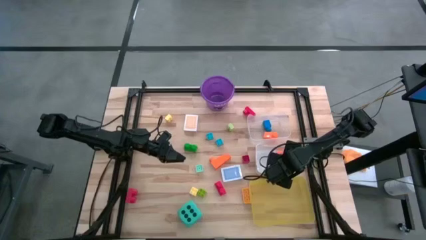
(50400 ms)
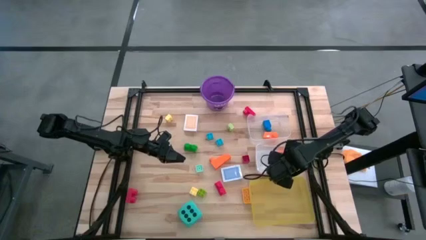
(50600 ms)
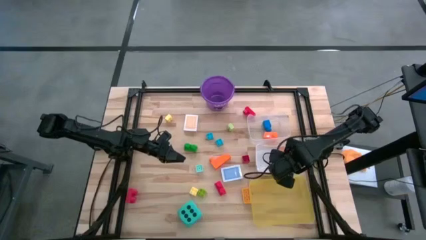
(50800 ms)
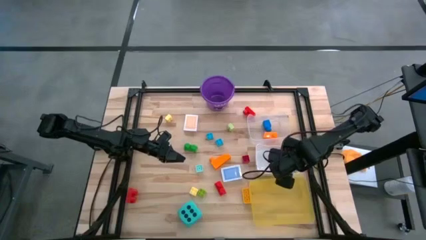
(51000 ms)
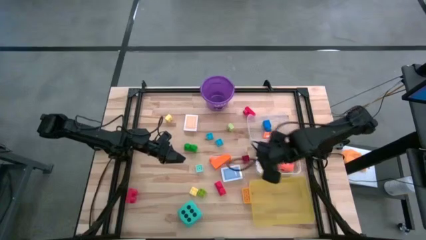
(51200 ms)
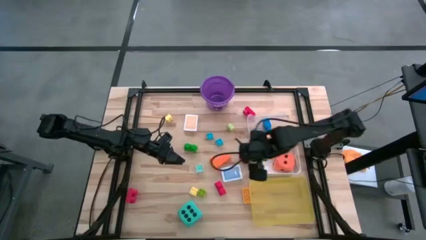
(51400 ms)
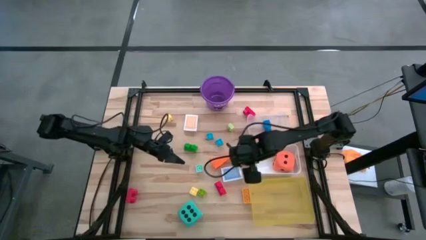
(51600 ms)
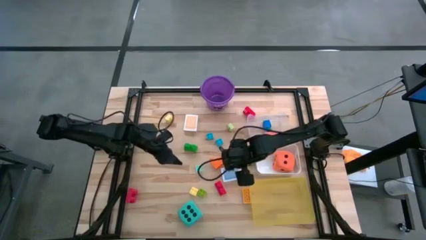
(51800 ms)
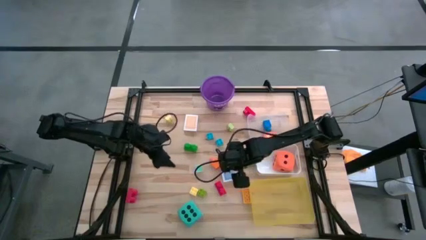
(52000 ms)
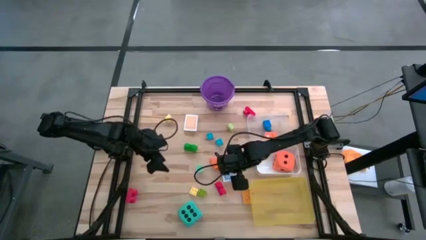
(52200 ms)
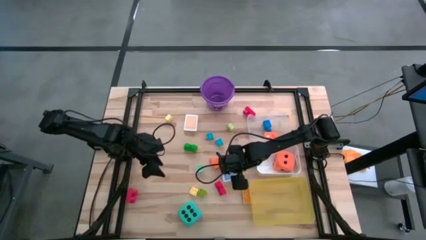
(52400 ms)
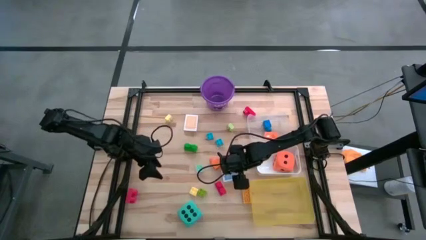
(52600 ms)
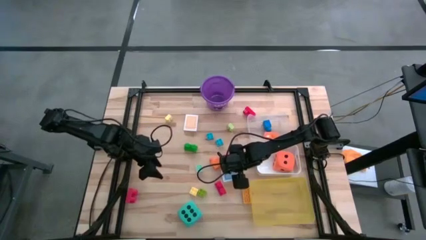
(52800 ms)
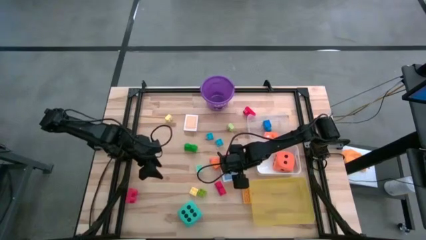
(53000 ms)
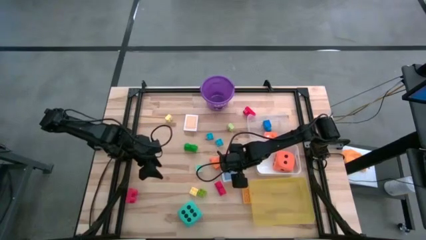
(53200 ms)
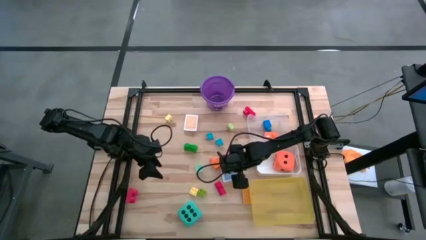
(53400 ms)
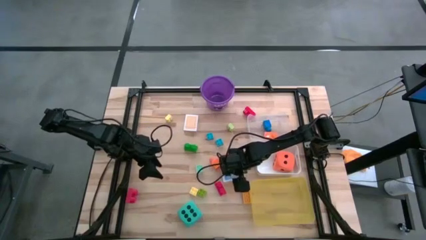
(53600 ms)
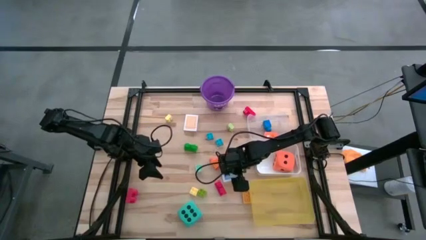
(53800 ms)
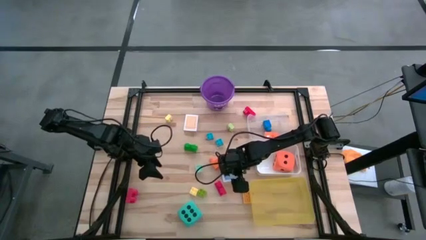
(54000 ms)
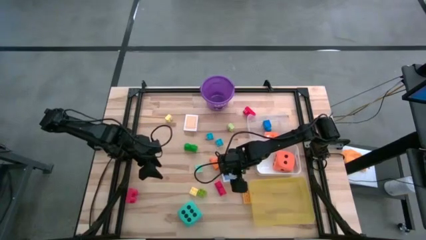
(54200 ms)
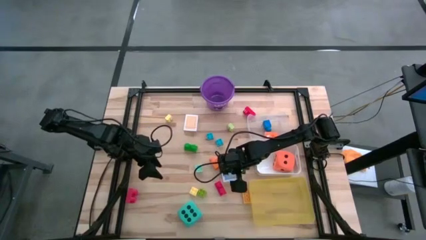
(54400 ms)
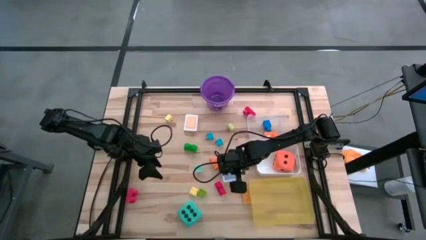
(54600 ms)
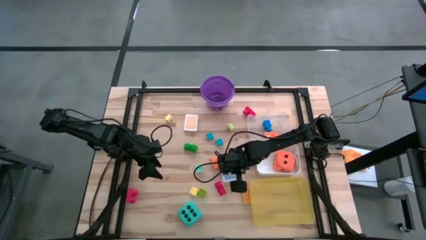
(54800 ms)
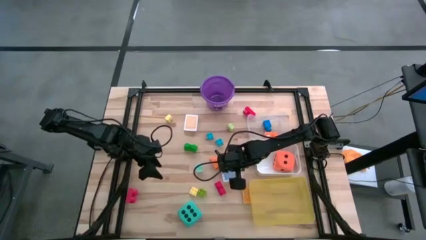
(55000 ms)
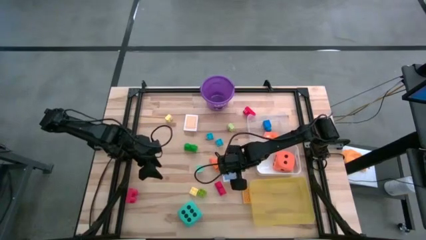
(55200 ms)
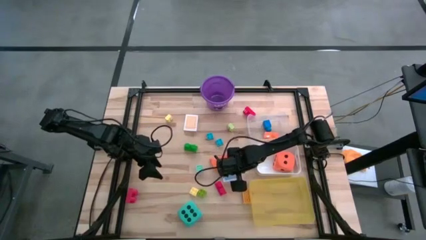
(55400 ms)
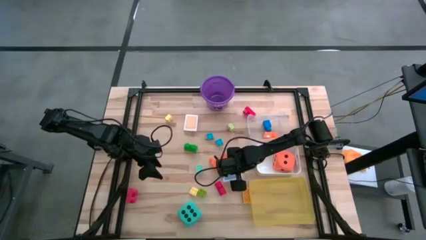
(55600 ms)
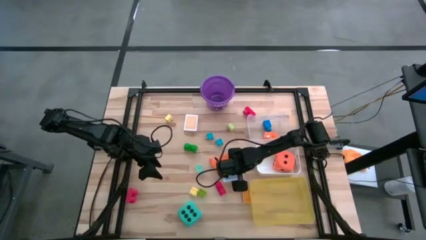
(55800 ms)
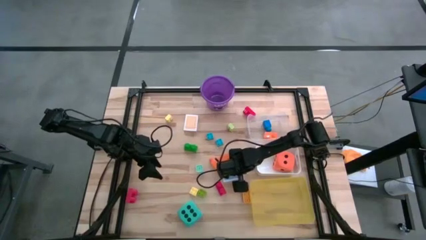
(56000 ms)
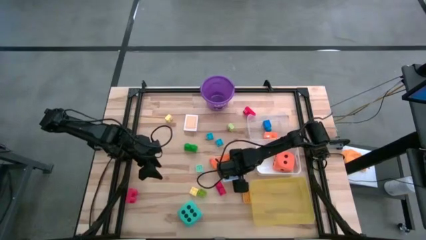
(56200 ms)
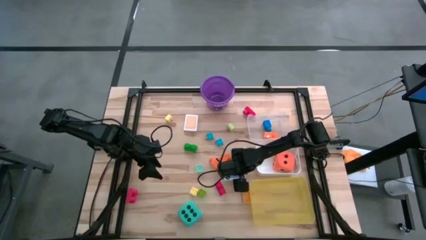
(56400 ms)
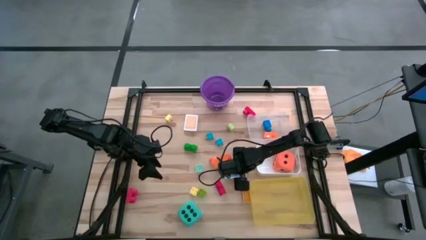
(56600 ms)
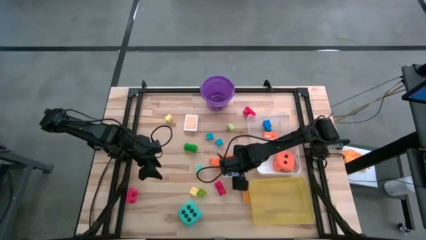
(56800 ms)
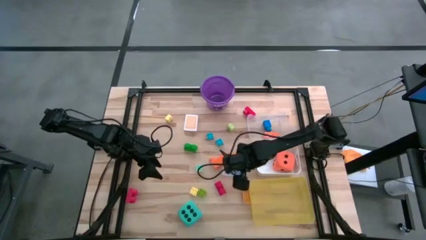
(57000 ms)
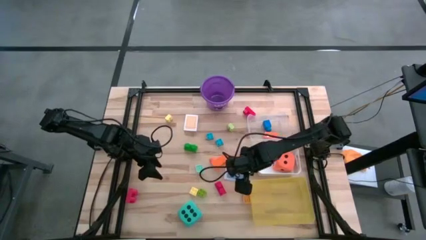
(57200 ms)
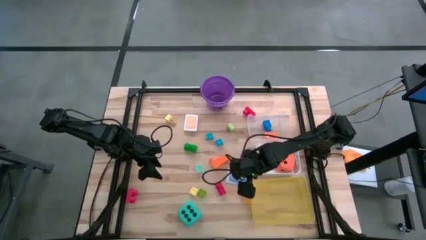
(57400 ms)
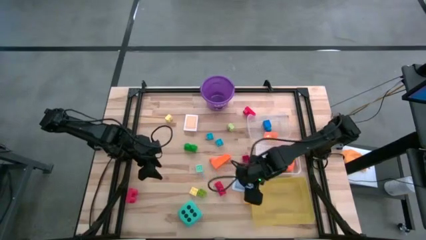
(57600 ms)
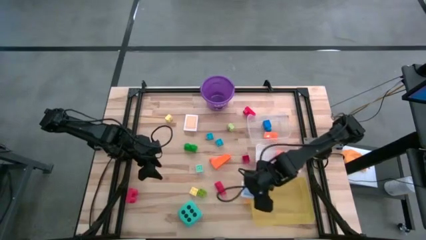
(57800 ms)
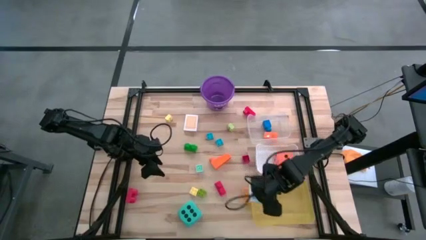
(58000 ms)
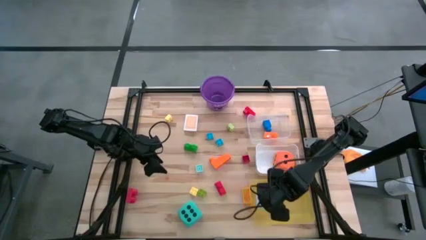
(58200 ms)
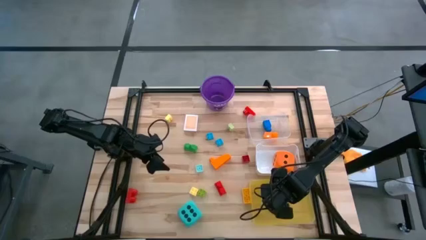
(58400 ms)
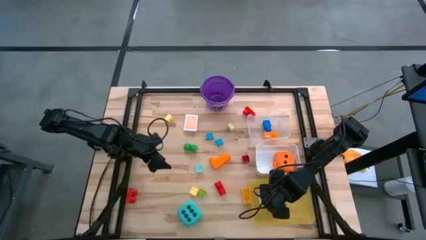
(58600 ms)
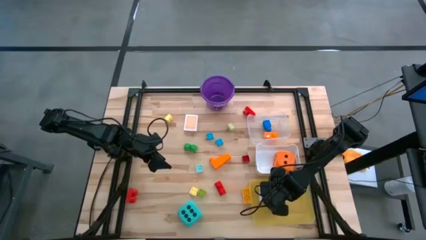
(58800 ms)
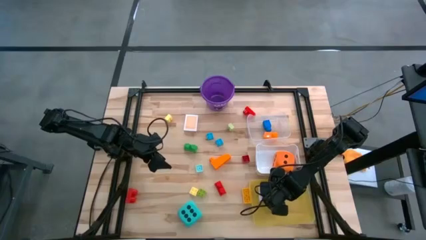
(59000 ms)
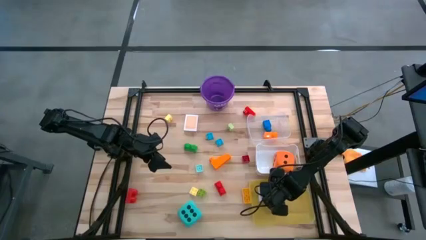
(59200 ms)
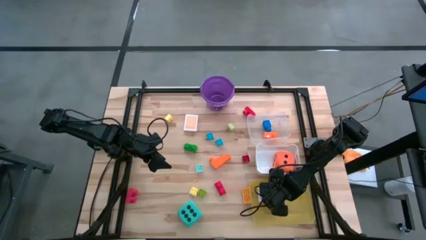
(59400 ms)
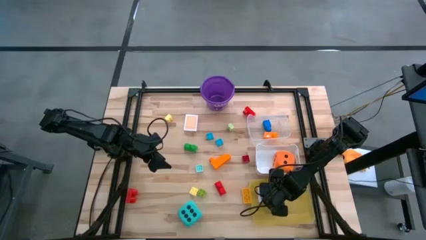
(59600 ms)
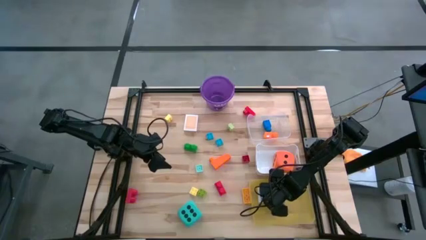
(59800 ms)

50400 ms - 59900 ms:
Task: Pick & Place Toys
Put the blue deck of cards into the yellow bin

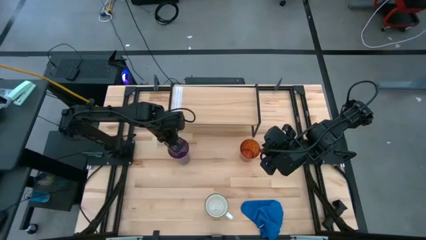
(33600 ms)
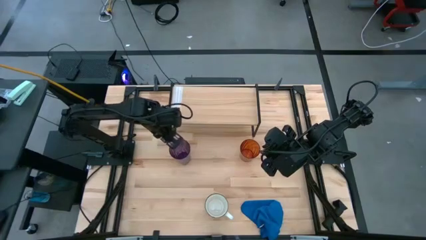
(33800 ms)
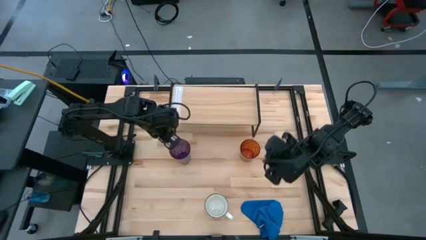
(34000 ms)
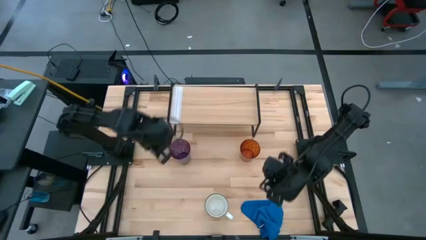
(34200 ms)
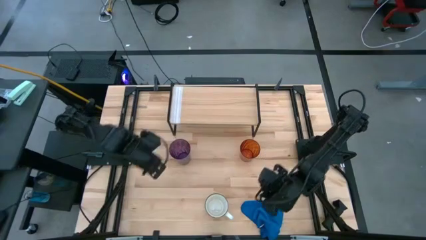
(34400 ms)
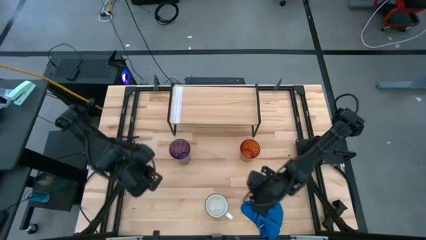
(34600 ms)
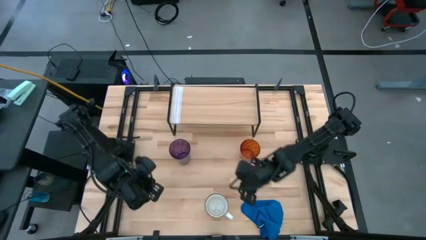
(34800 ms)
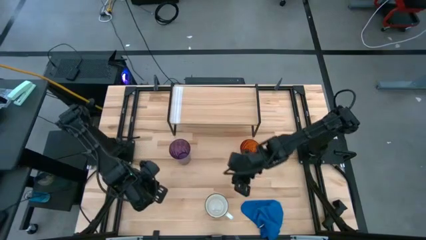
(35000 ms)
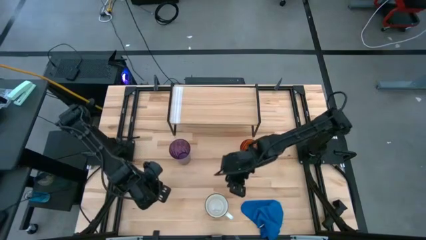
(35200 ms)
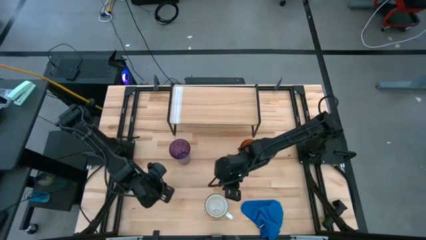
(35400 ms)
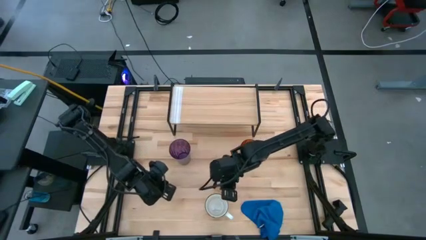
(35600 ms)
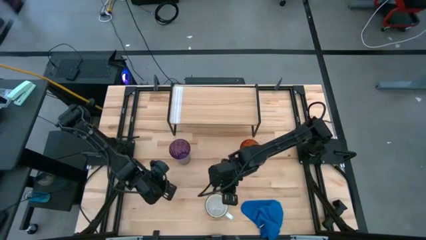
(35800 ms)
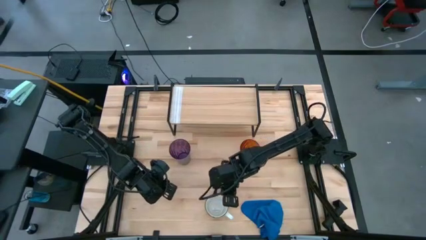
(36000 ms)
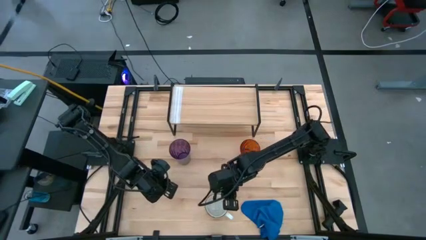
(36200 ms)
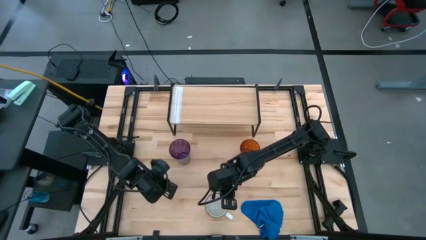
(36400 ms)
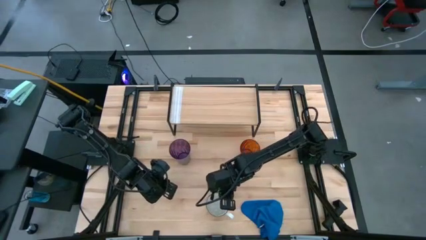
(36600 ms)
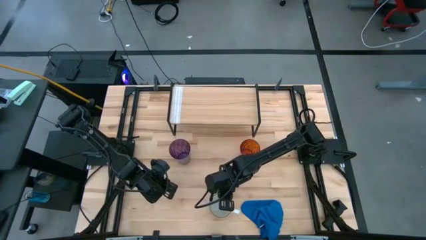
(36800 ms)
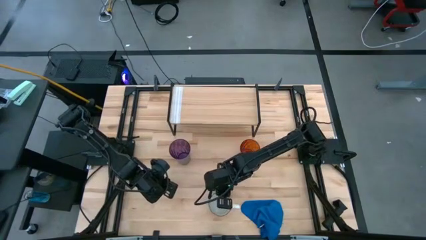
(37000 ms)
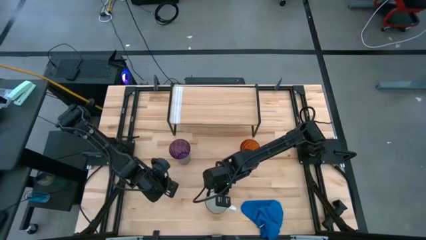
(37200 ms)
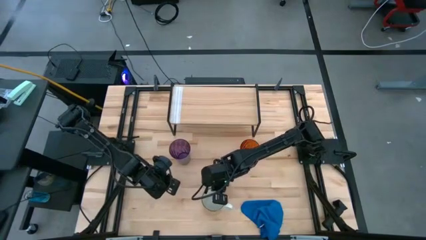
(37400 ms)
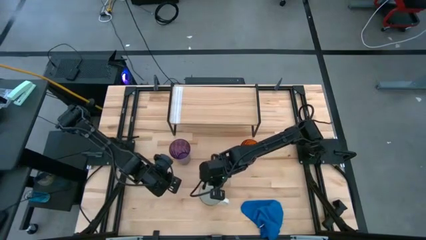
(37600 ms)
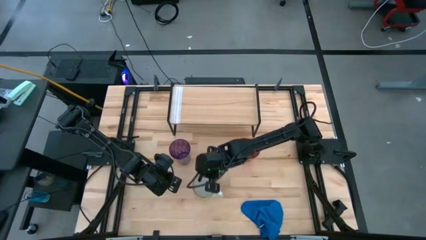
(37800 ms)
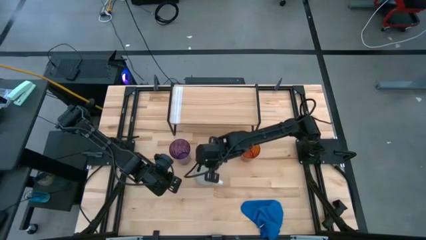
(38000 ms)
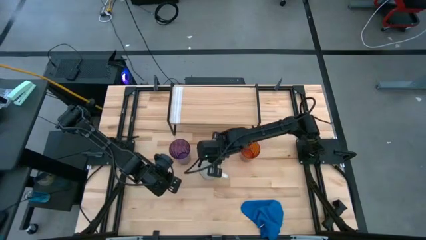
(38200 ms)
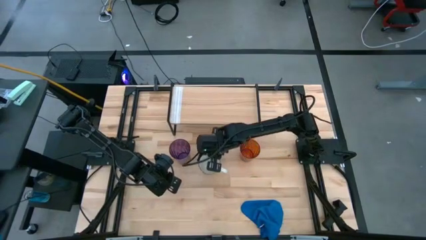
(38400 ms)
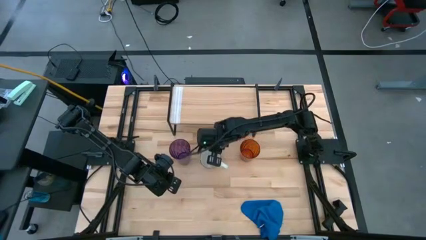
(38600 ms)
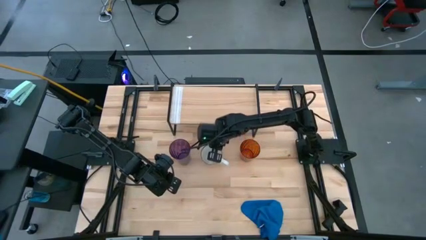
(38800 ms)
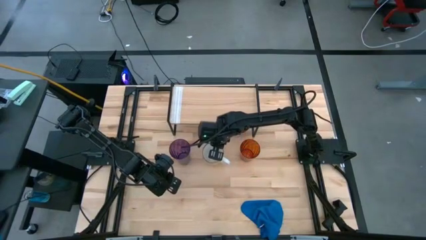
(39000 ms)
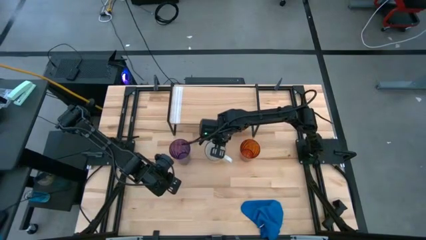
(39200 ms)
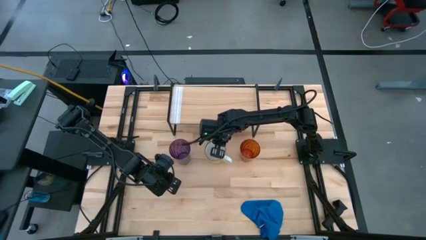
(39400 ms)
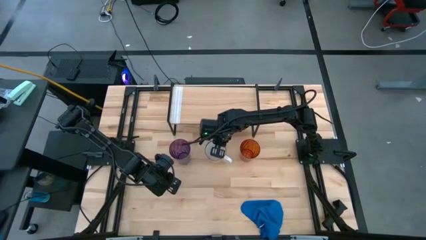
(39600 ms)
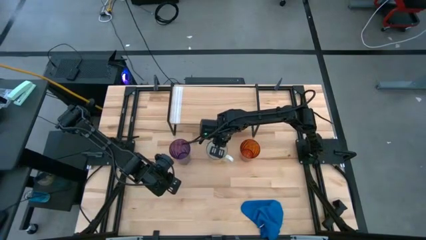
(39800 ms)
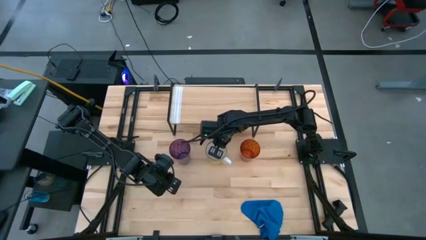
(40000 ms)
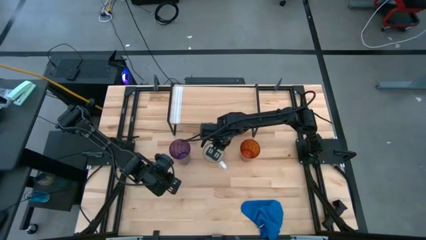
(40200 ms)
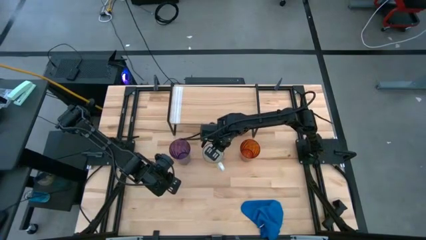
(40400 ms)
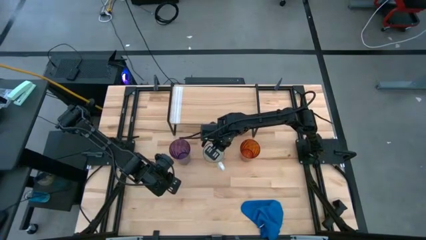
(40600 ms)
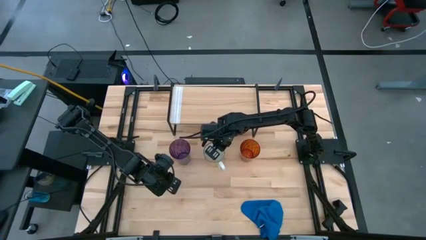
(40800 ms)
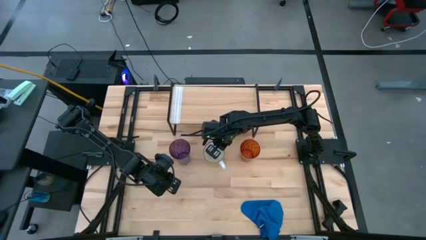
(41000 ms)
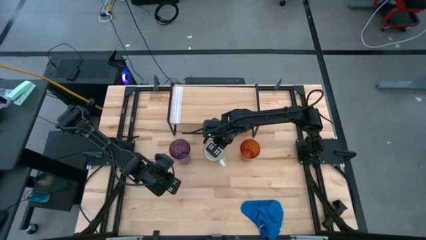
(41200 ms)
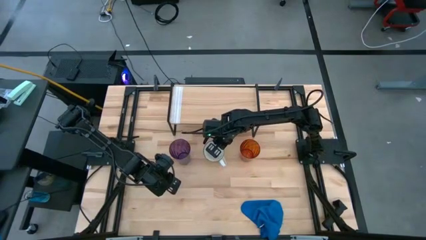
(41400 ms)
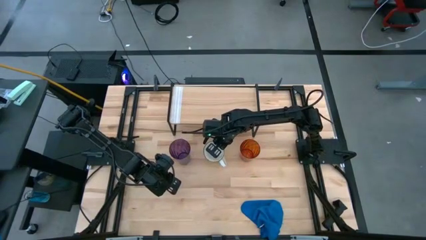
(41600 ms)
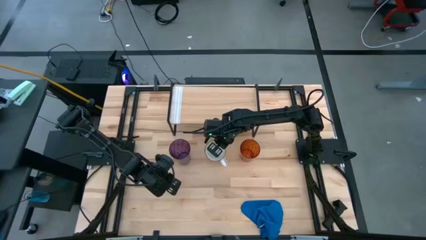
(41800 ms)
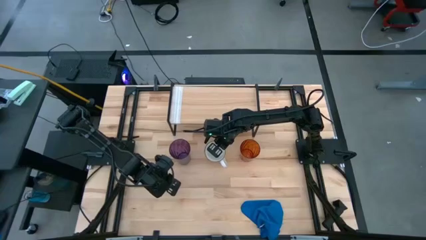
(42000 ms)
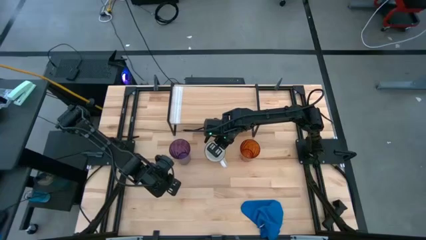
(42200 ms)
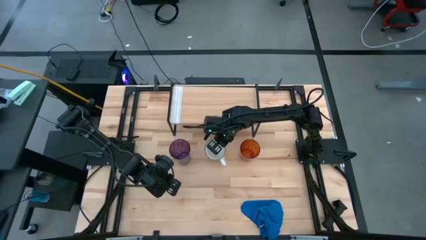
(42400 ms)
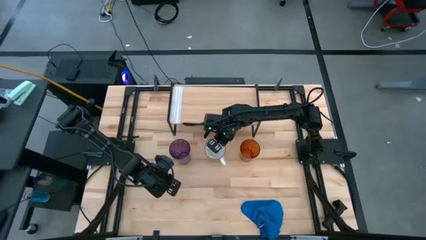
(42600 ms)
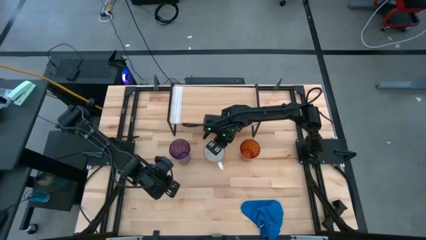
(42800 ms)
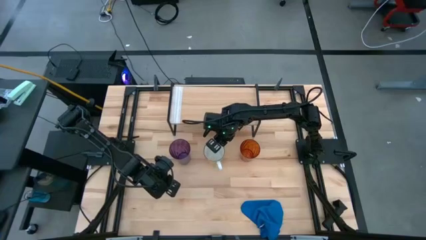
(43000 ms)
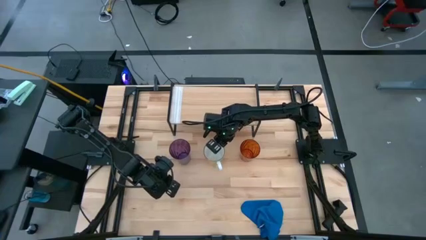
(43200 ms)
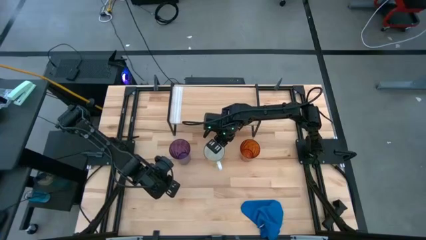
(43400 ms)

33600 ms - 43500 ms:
Task: Stack small to large cups/mugs on shelf
Prepare the yellow mug
